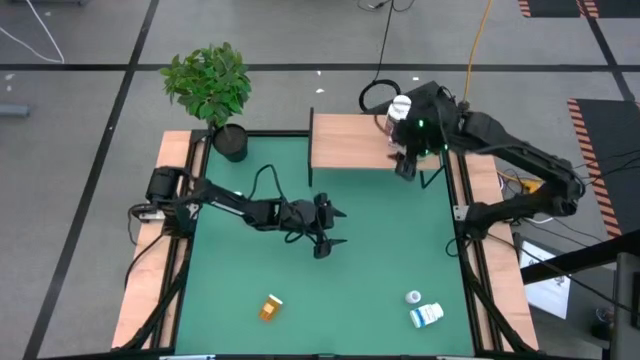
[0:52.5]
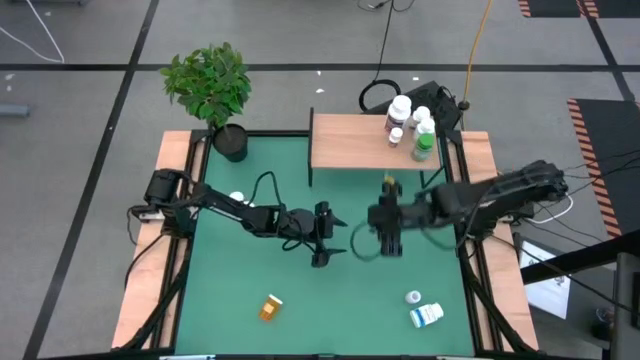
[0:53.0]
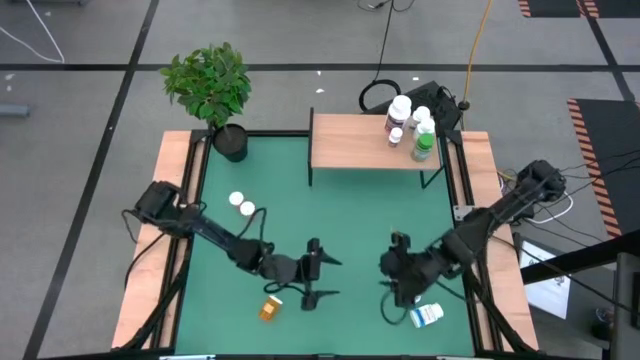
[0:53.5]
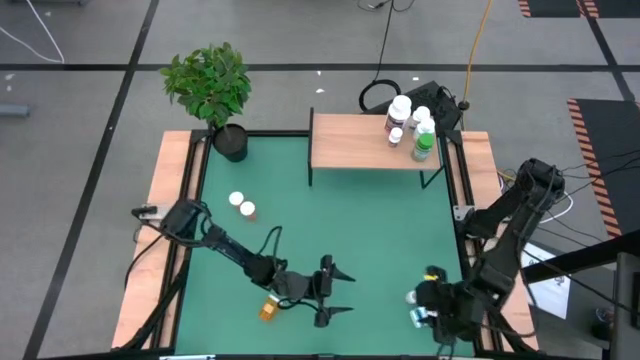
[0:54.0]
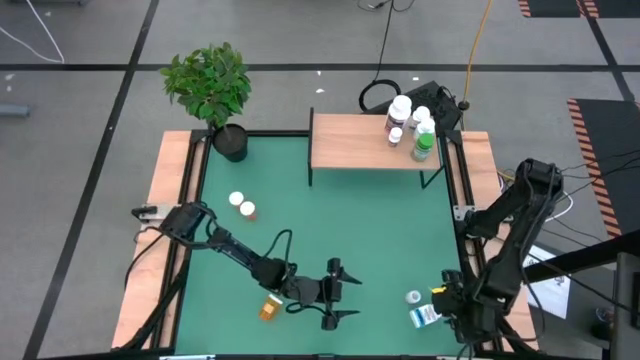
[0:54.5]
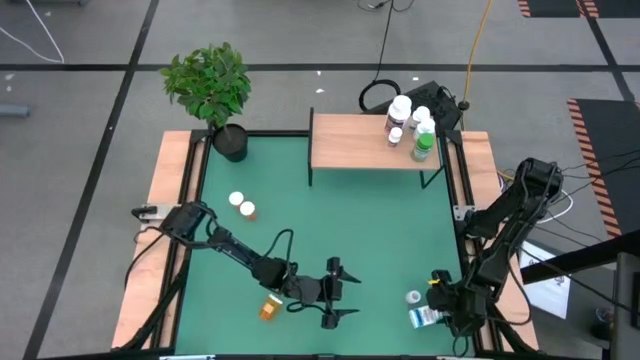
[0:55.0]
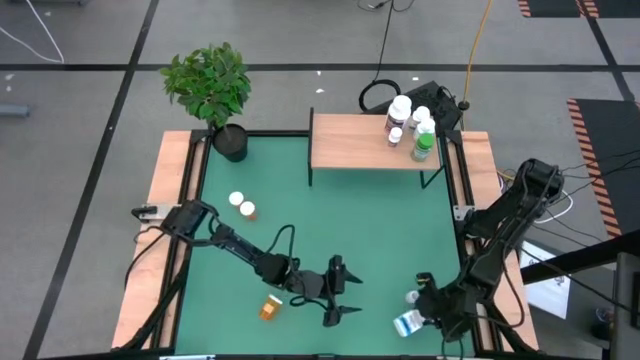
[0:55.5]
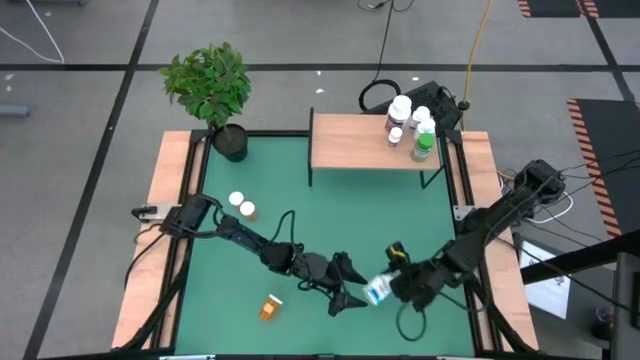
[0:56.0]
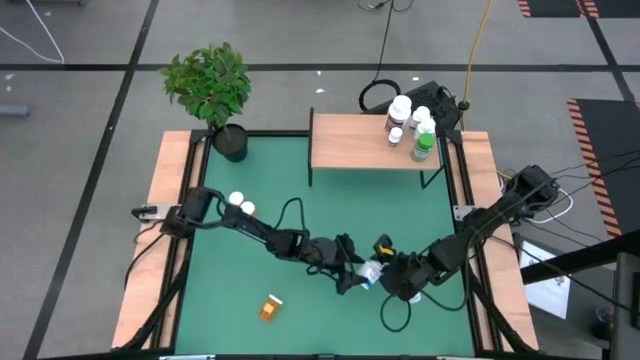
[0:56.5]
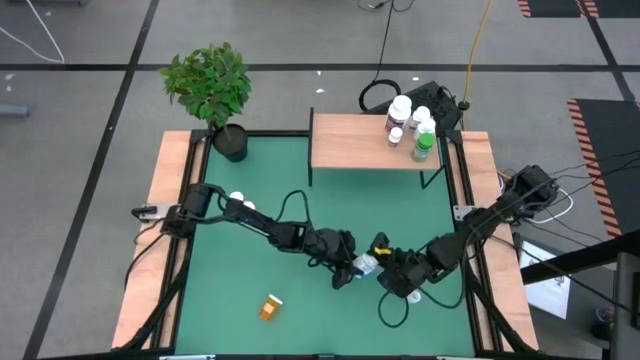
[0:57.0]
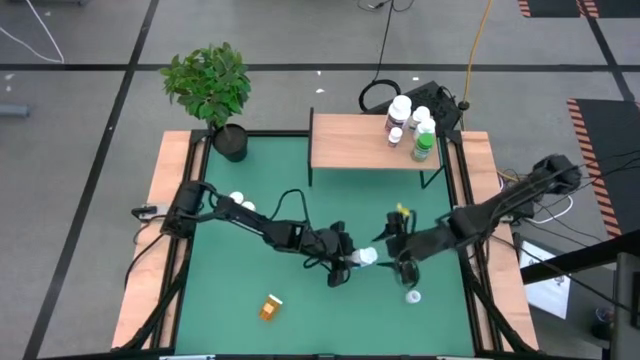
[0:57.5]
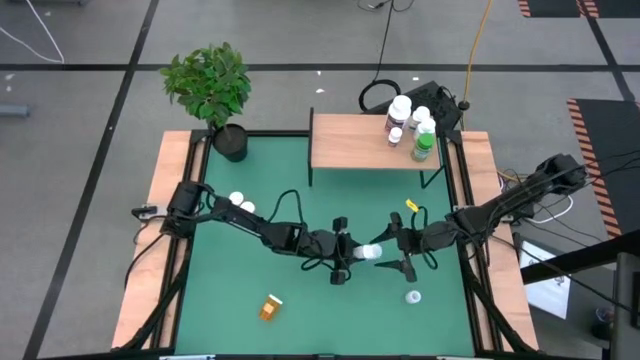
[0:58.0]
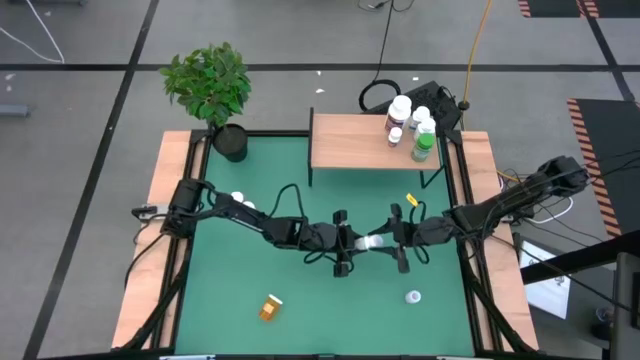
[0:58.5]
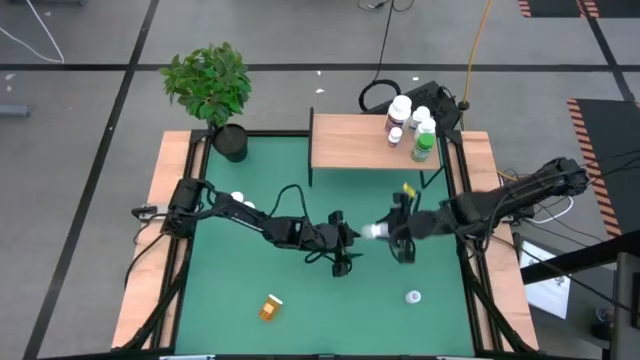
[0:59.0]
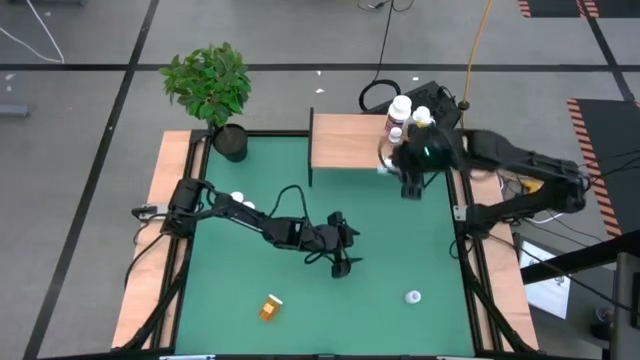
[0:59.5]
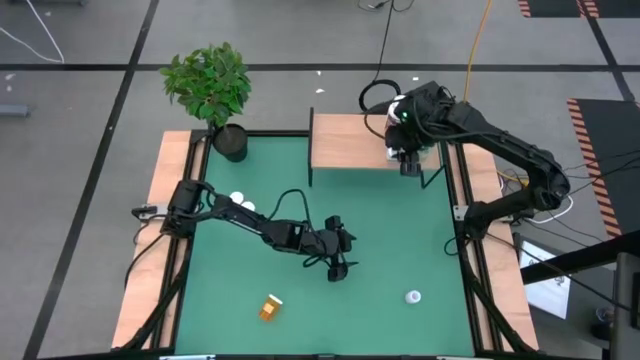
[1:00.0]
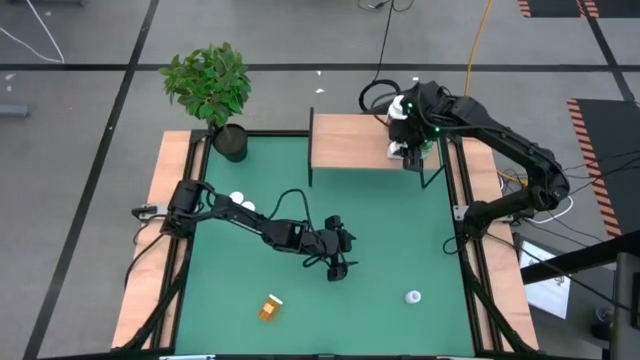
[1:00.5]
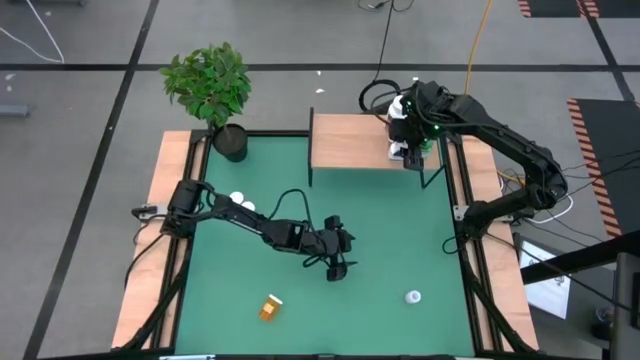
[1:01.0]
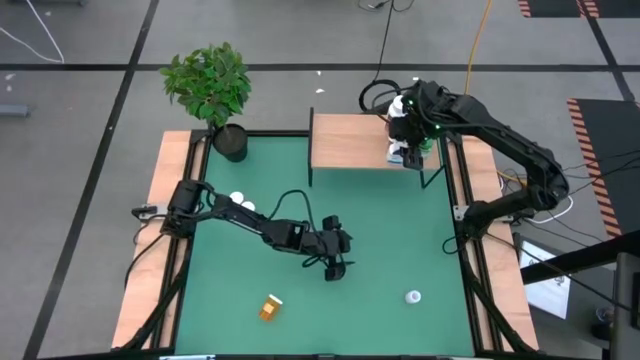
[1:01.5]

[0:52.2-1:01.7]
Task: Pick and place medicine bottles onto shelf by color
Put the blue pill bottle on the shelf

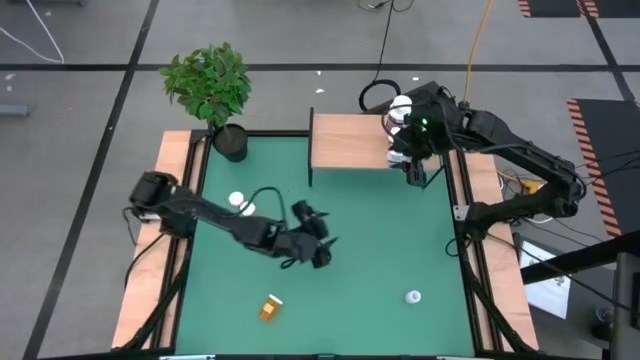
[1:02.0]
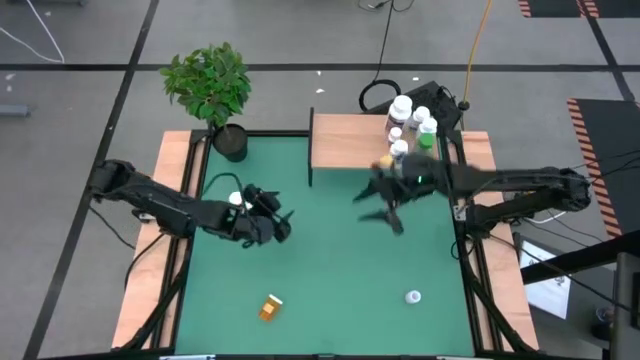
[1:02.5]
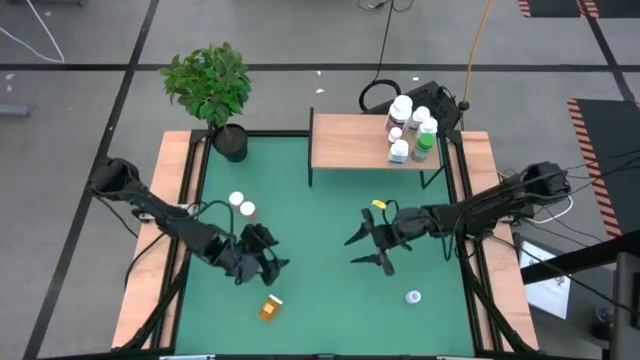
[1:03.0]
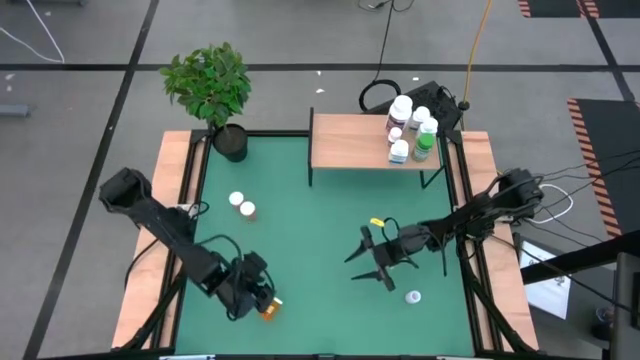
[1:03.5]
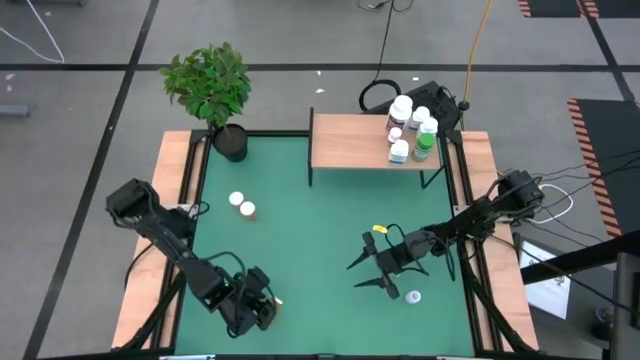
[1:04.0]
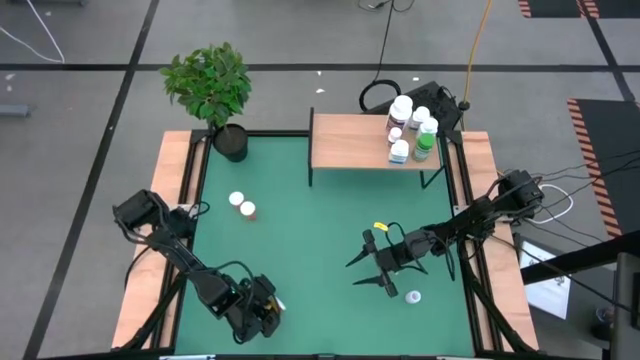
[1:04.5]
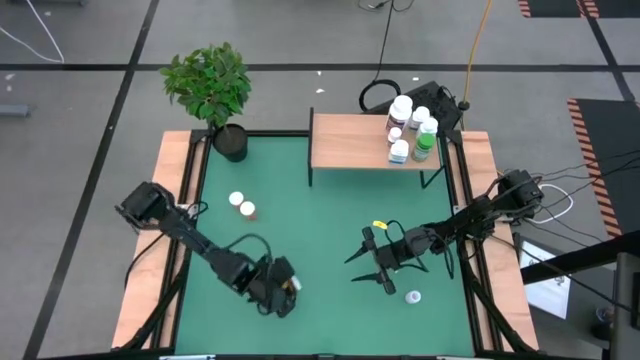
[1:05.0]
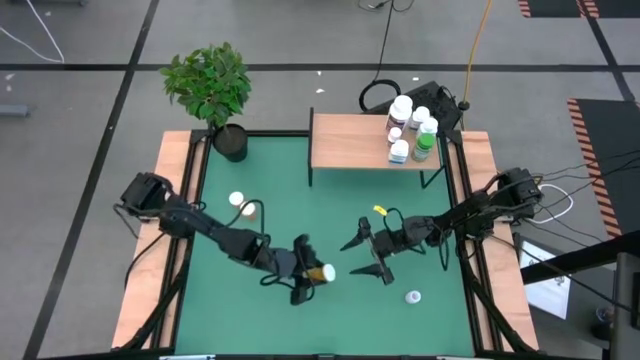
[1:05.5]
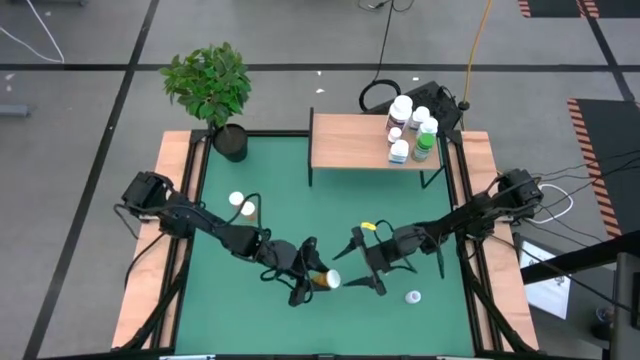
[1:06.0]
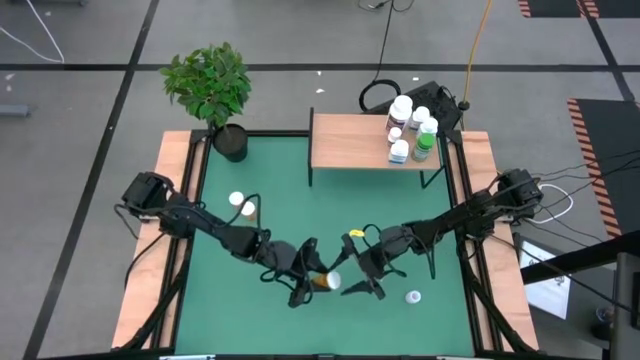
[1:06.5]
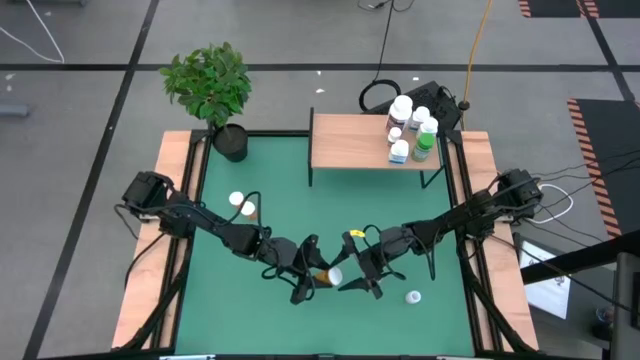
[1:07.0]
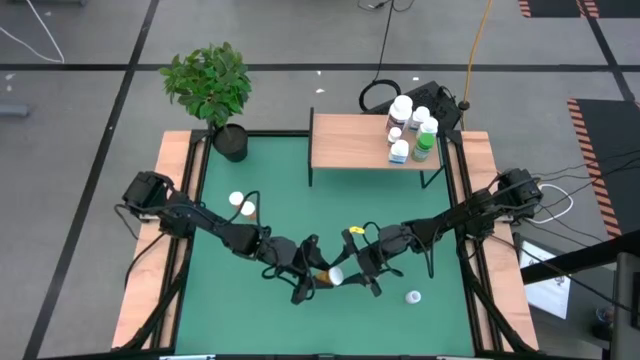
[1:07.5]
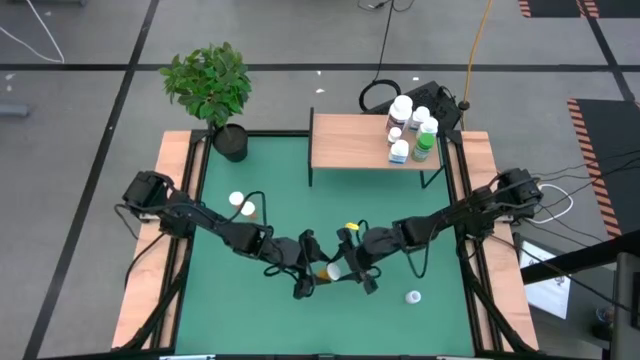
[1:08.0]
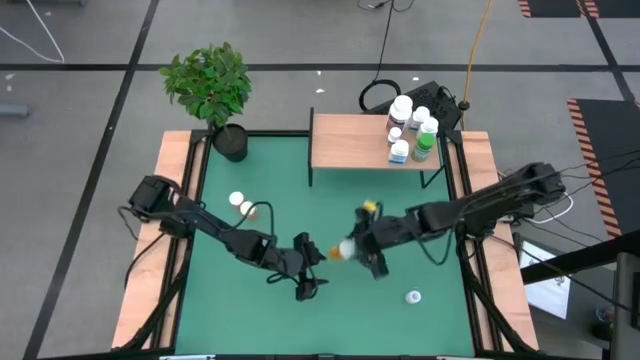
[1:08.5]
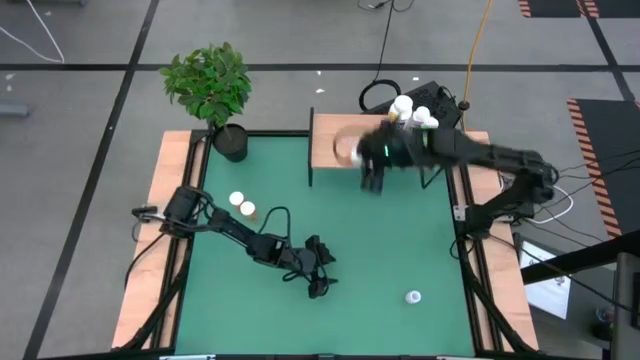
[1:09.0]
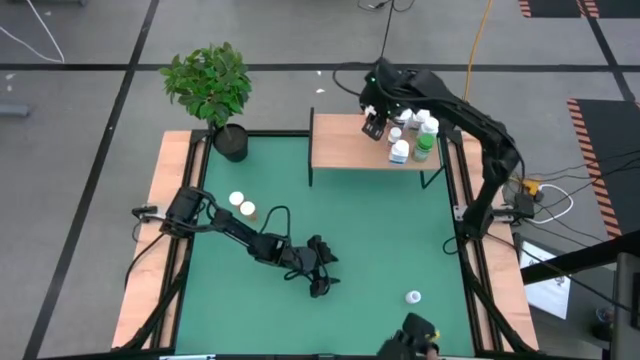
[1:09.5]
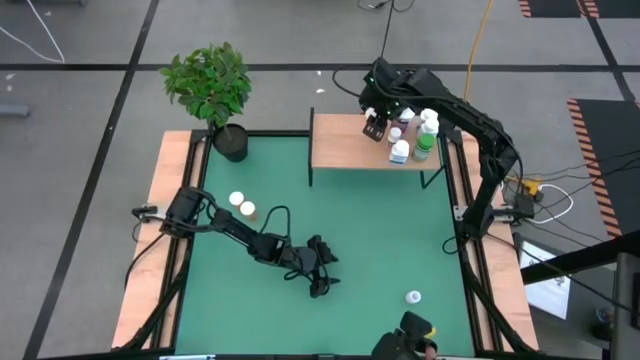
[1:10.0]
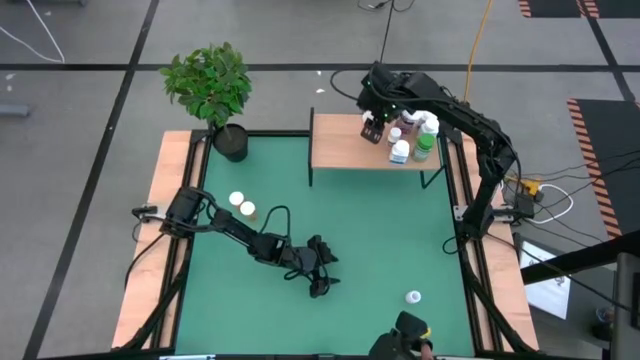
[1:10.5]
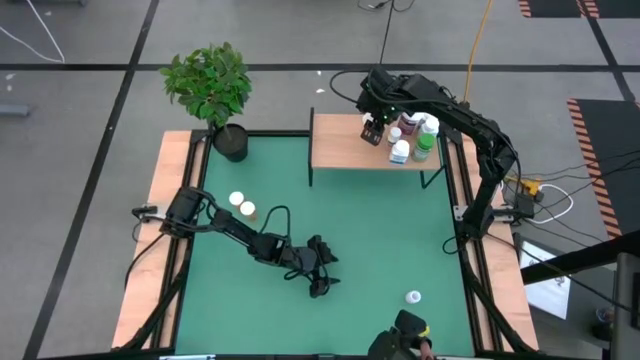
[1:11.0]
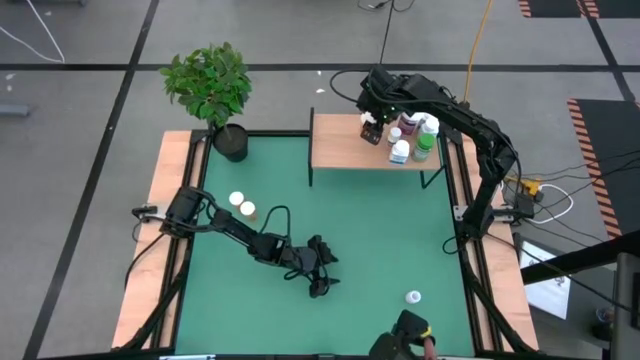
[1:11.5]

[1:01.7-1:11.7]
Put the bottom orange pill bottle on the shelf

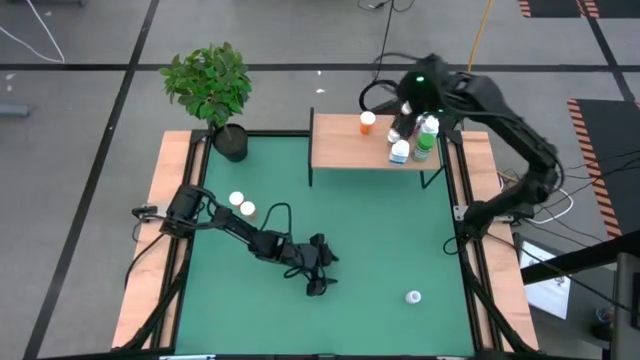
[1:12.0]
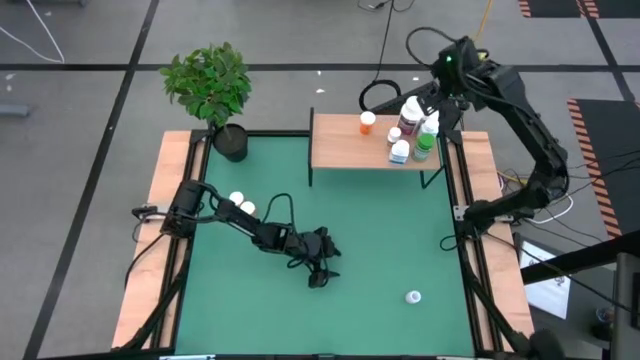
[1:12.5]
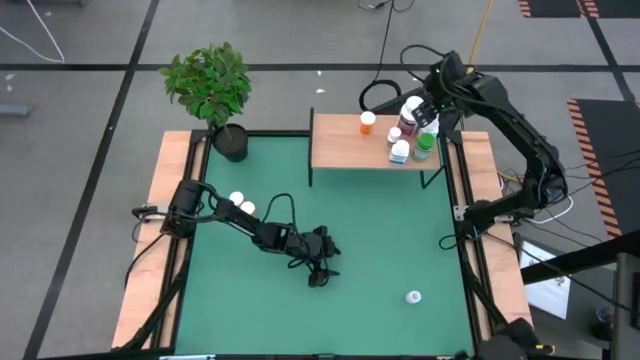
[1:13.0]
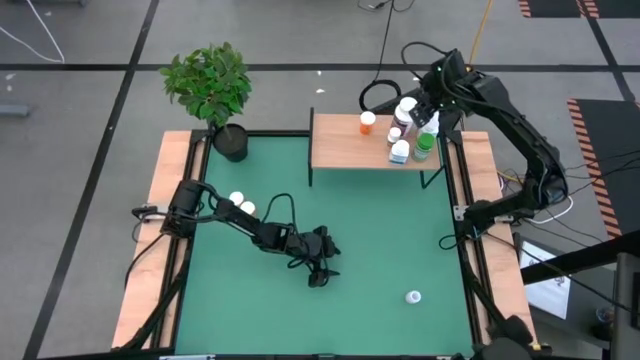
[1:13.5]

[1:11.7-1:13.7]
Adjust the violet pill bottle on the shelf
